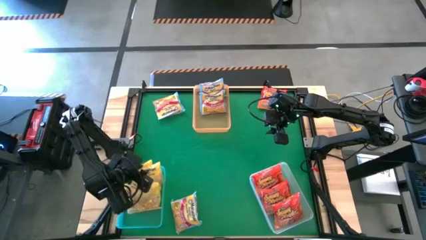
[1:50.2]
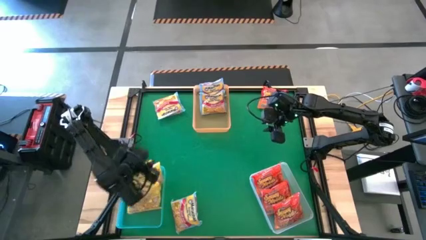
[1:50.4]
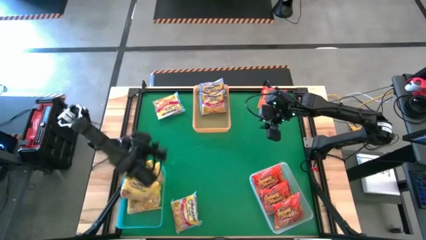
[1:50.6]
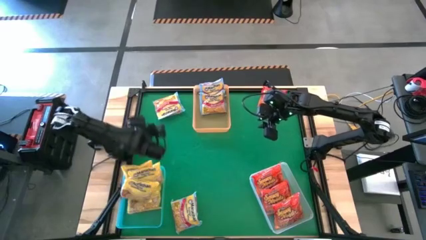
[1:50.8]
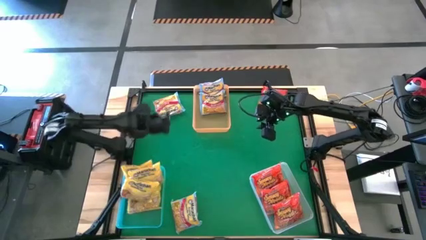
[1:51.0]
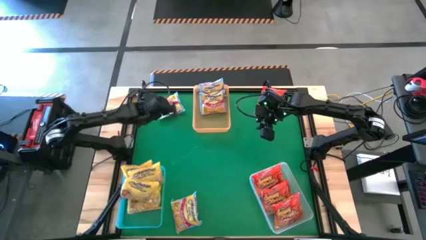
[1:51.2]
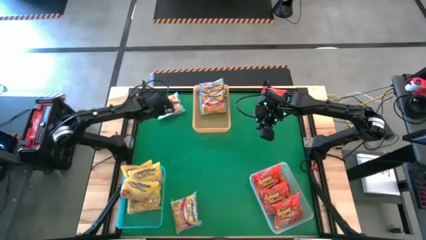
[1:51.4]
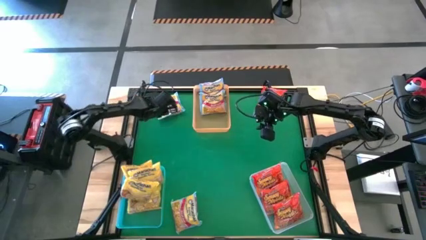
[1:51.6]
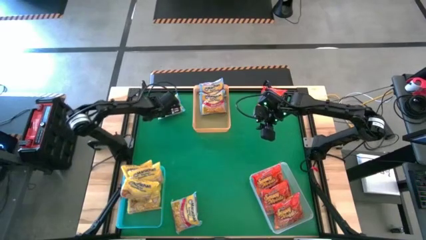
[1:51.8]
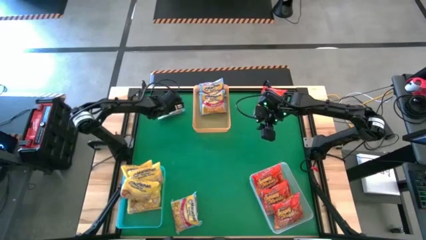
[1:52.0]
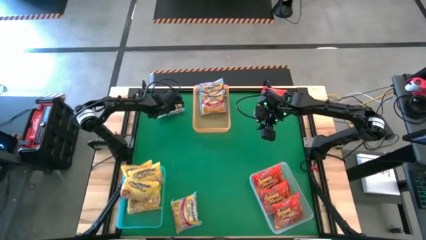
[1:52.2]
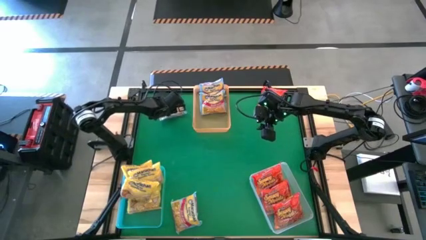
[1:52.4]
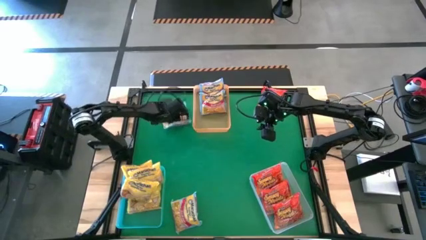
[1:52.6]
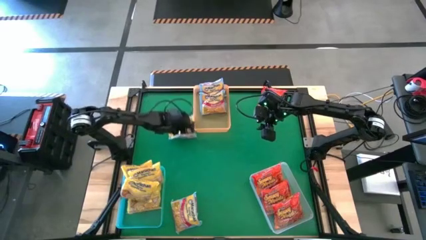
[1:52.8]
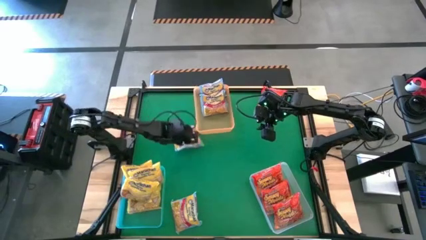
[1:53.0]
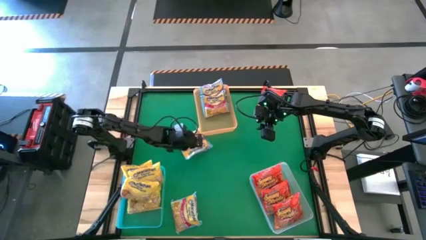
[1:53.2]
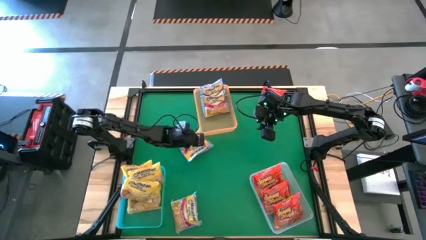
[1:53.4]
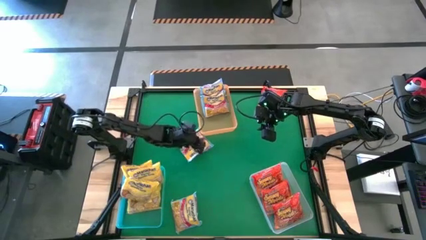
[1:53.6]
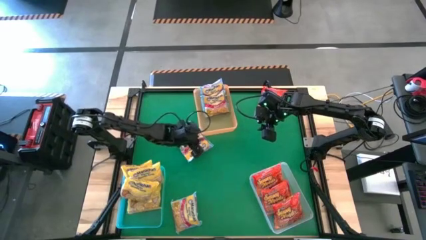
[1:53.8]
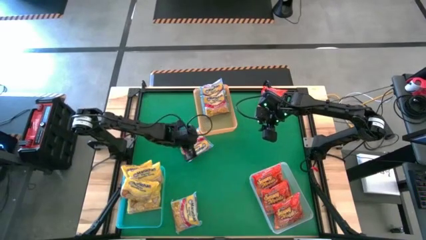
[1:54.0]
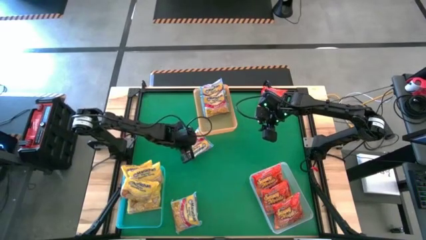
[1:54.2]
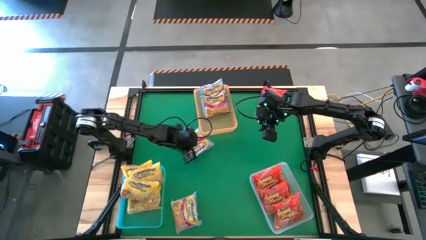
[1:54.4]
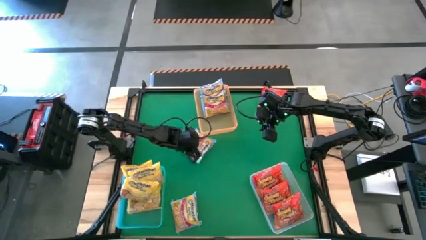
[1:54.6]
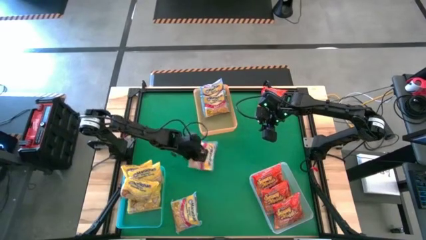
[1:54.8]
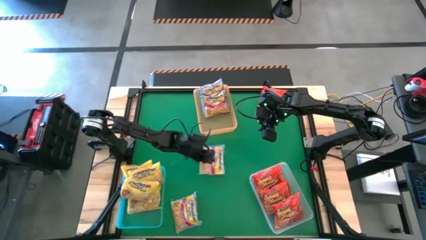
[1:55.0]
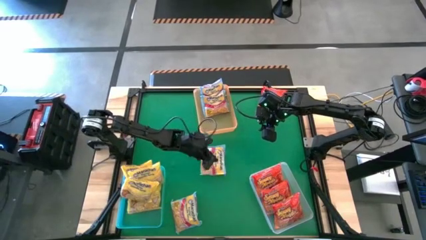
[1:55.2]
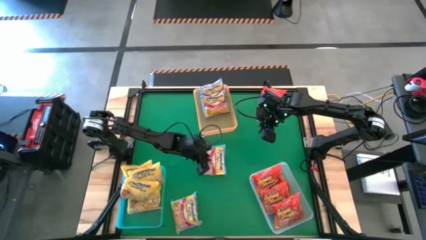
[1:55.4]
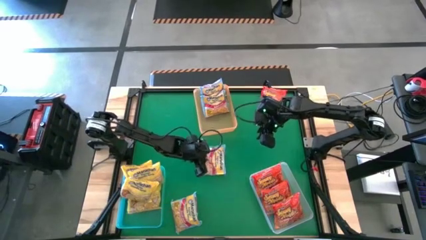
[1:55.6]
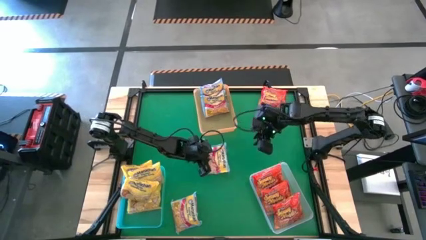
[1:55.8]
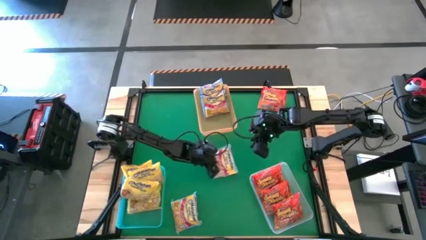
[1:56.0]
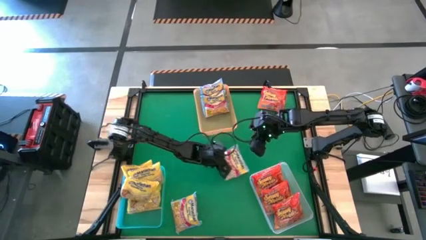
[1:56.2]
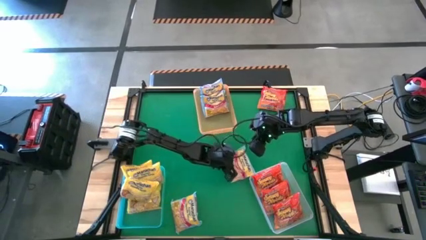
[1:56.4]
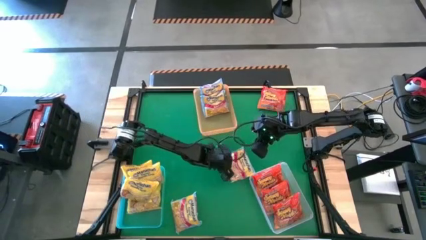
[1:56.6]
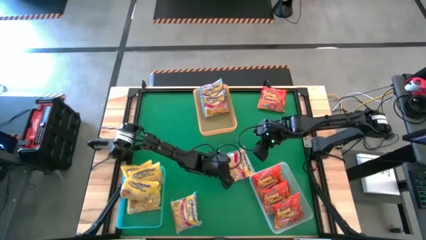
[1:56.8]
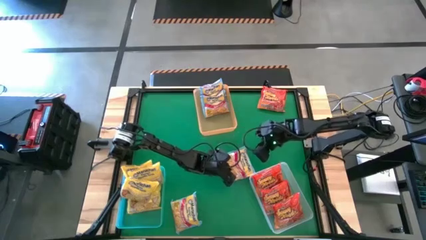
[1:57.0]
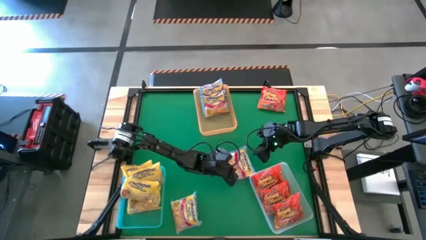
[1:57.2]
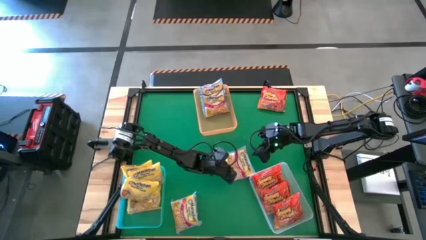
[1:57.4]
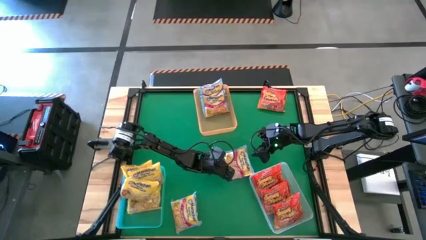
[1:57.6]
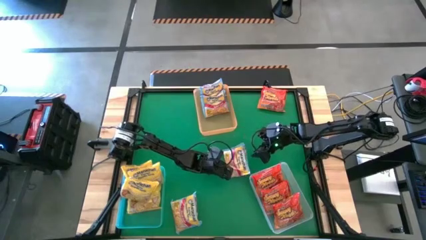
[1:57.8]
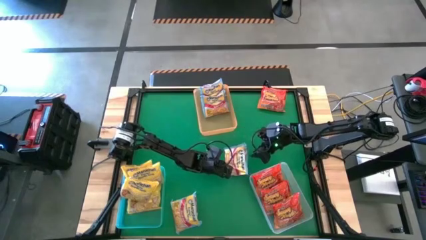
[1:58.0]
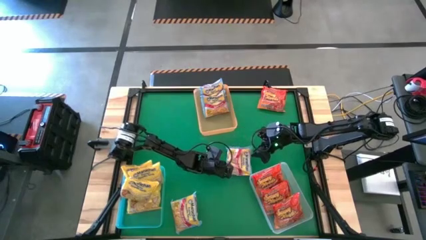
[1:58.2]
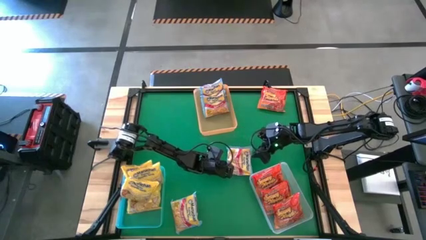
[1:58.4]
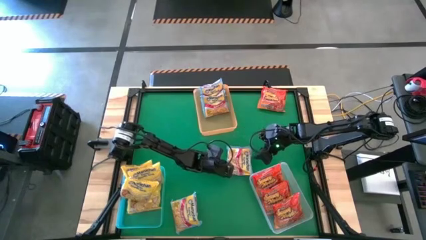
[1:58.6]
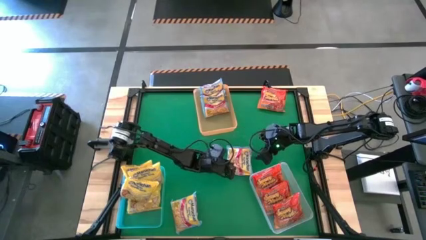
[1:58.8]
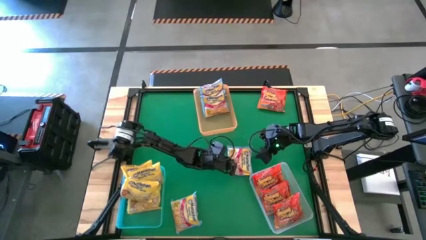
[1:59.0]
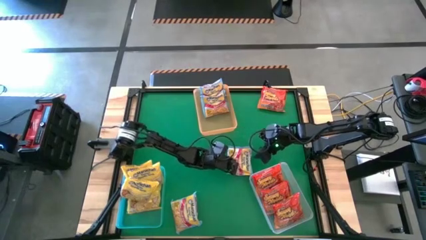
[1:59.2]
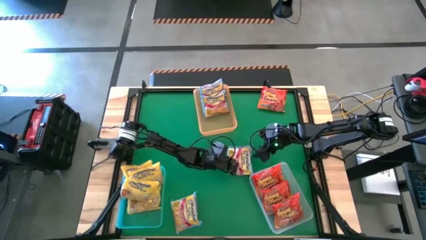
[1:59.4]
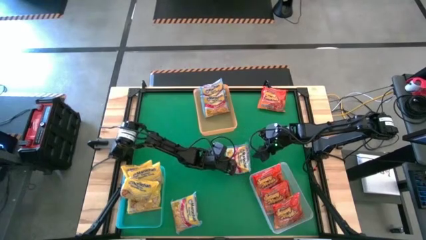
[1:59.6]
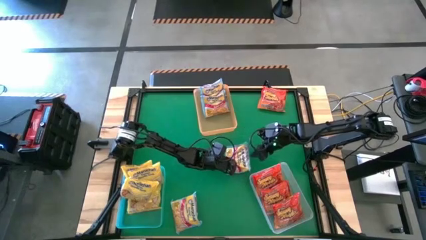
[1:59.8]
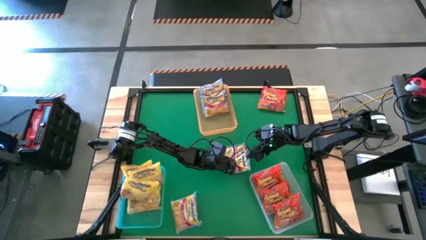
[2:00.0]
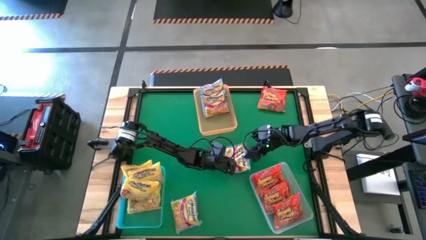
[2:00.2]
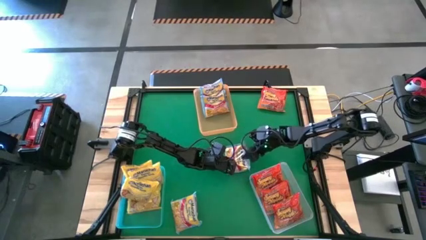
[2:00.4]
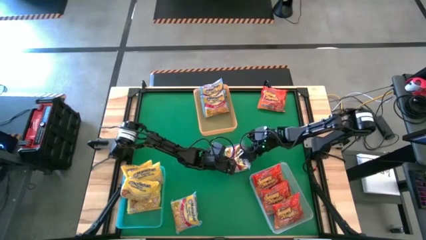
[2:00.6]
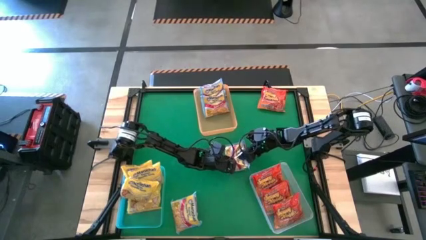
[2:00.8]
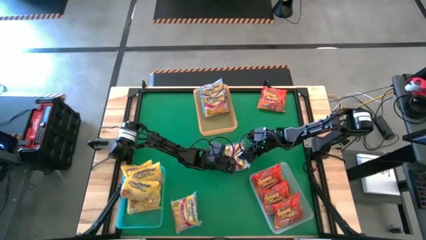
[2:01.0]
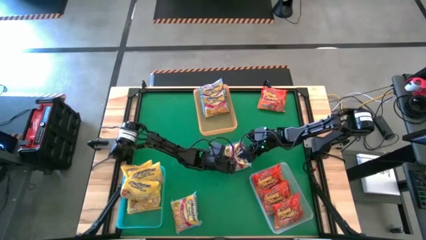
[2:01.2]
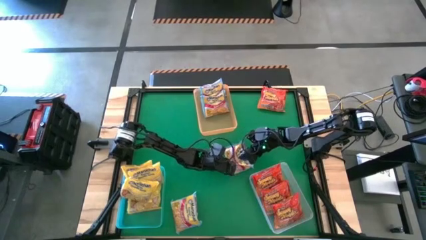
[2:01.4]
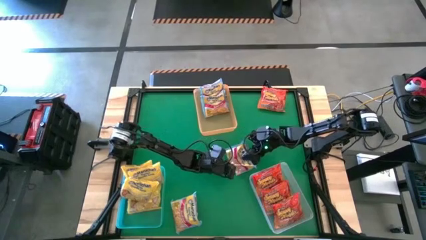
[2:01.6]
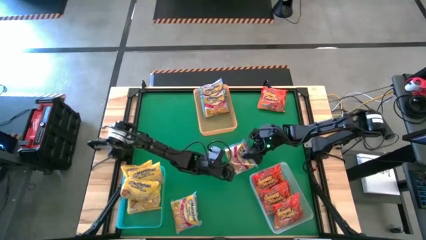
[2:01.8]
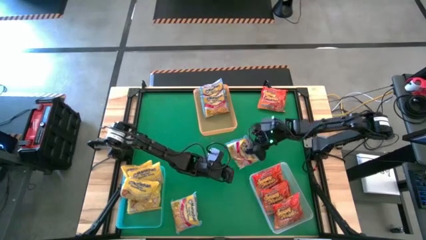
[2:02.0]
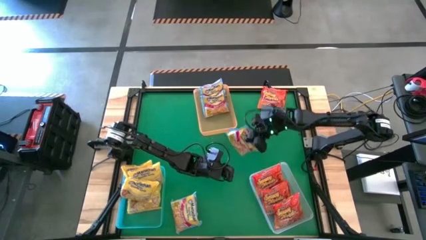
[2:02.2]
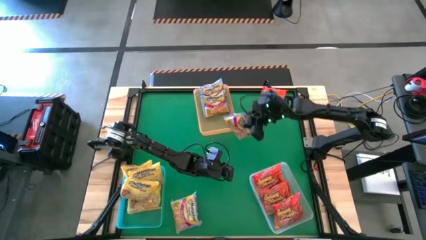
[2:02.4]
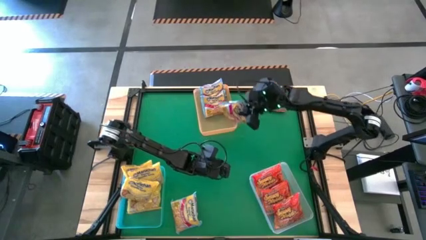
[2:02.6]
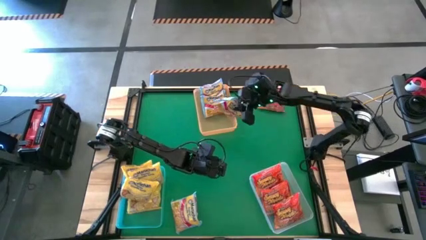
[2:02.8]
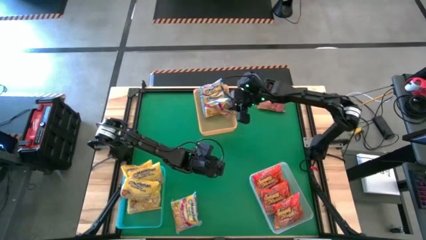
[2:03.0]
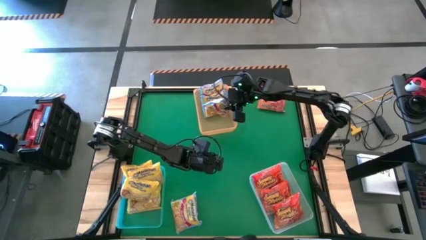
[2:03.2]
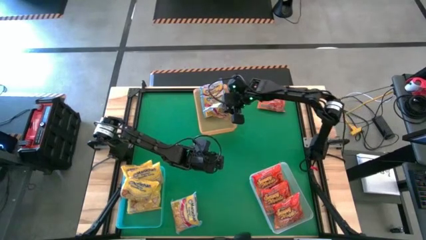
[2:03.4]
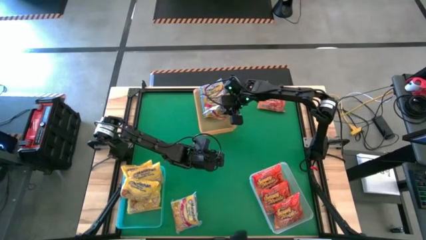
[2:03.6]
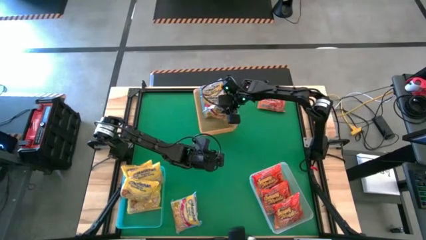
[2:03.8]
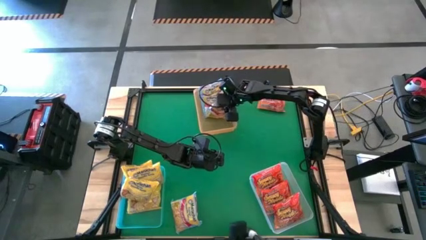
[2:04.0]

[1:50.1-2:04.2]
Task: Sort Maruchan noodles
Put the blue noodle pack into the yellow bin
